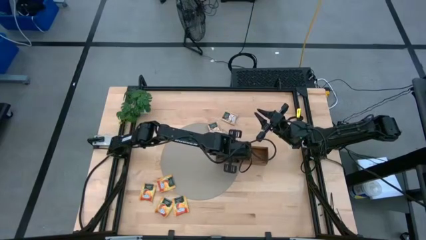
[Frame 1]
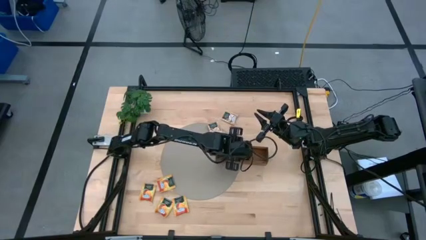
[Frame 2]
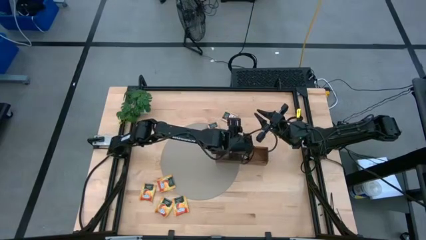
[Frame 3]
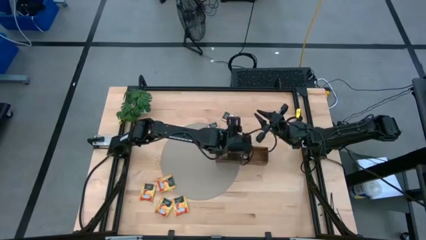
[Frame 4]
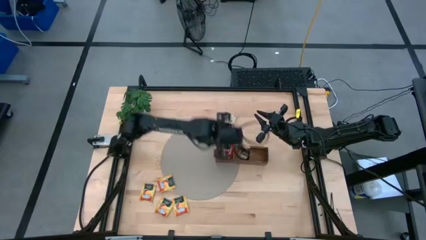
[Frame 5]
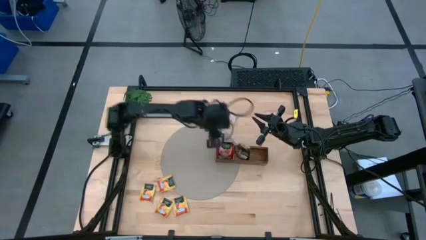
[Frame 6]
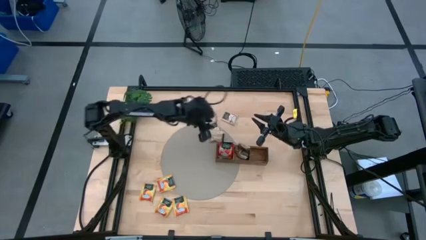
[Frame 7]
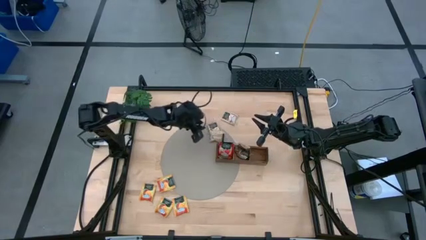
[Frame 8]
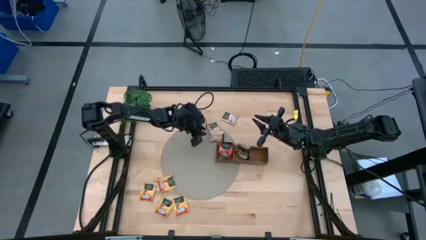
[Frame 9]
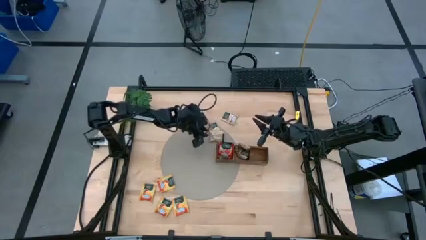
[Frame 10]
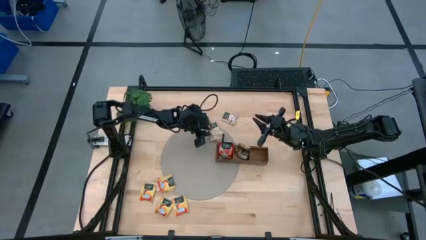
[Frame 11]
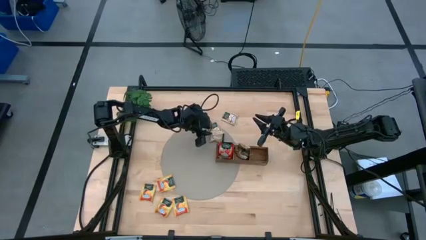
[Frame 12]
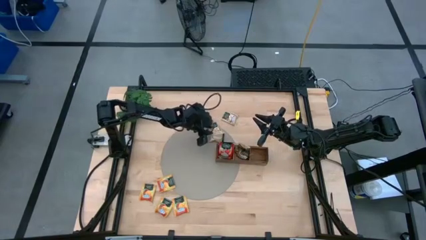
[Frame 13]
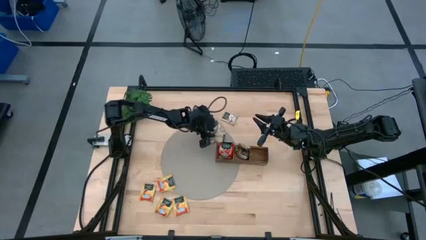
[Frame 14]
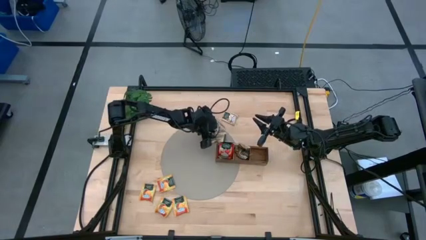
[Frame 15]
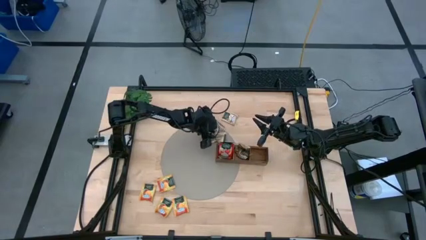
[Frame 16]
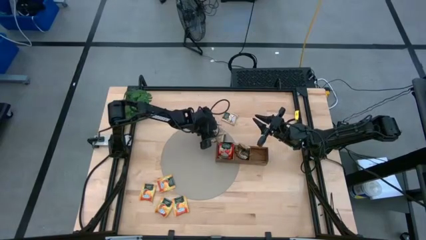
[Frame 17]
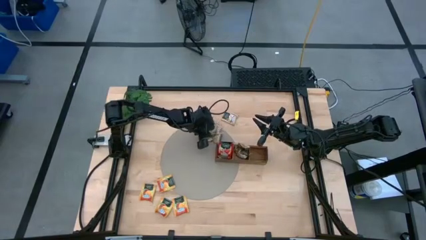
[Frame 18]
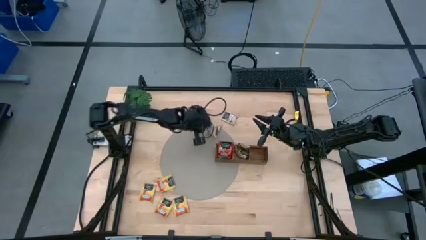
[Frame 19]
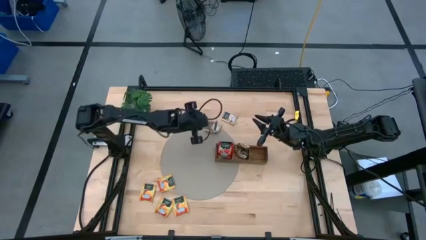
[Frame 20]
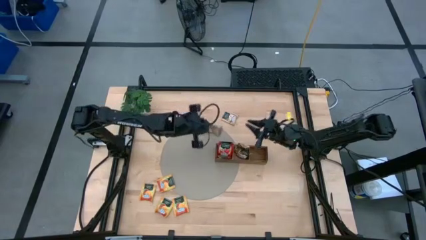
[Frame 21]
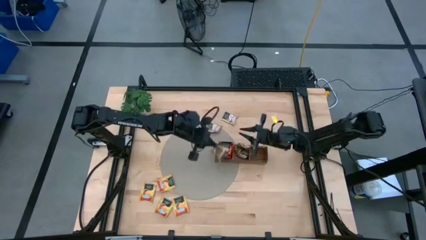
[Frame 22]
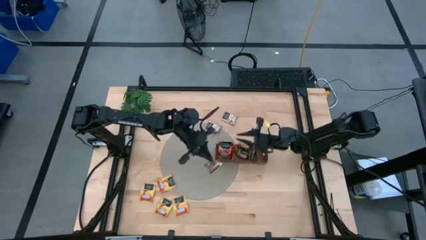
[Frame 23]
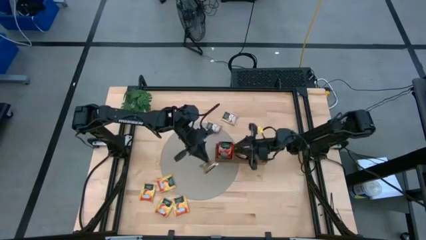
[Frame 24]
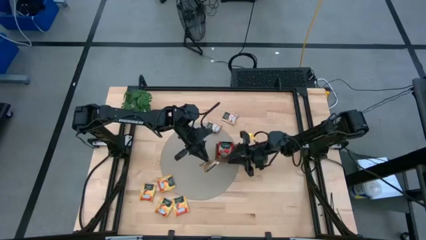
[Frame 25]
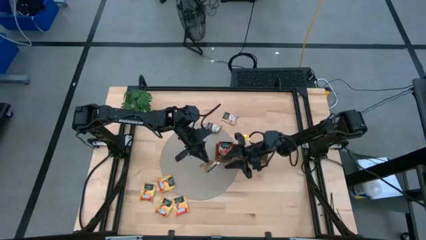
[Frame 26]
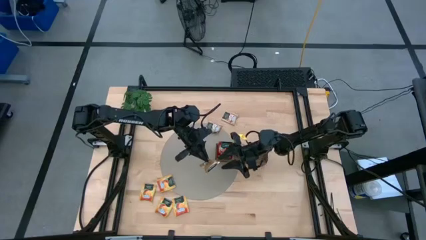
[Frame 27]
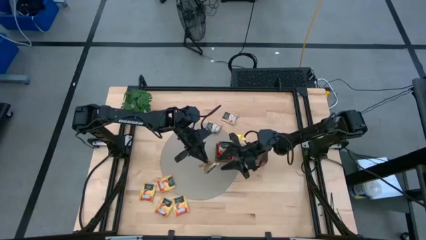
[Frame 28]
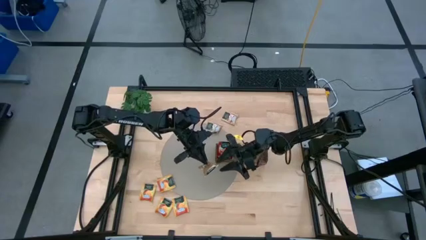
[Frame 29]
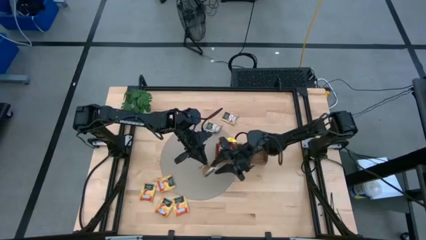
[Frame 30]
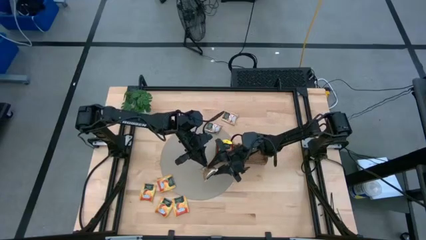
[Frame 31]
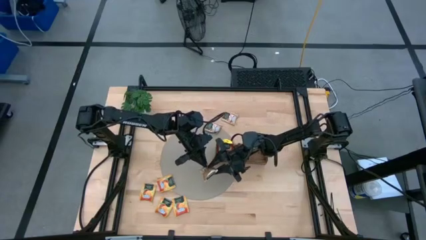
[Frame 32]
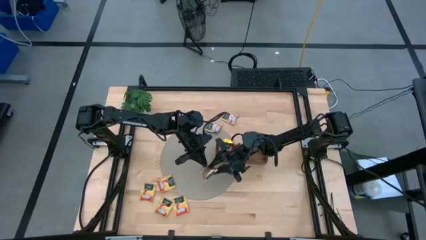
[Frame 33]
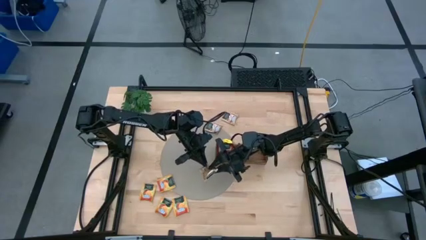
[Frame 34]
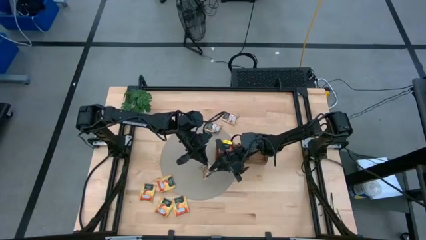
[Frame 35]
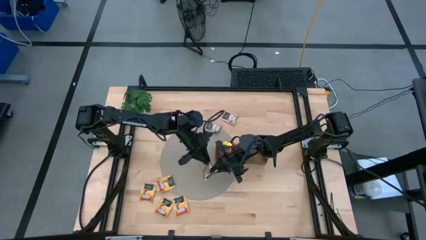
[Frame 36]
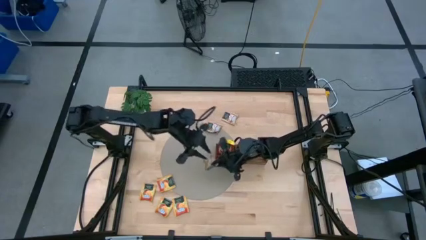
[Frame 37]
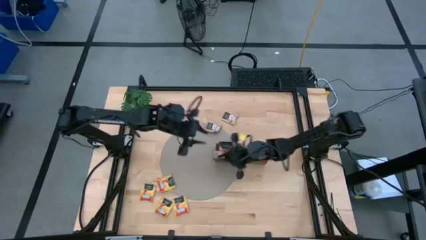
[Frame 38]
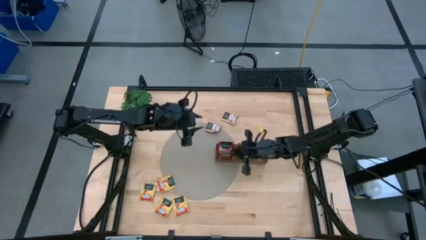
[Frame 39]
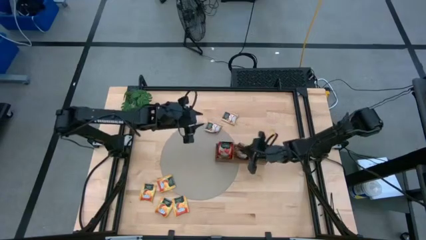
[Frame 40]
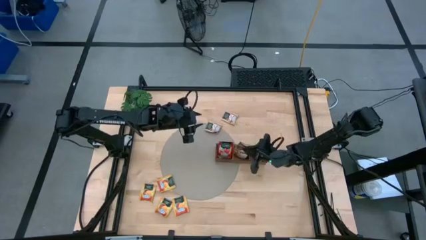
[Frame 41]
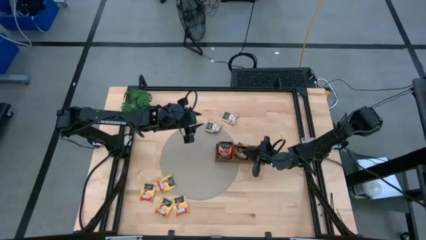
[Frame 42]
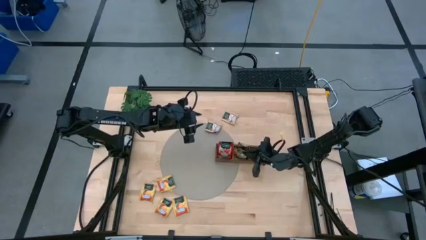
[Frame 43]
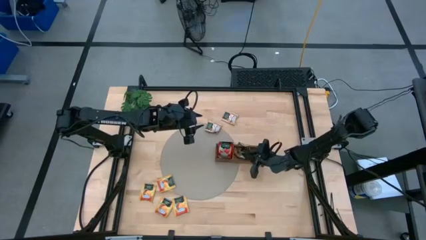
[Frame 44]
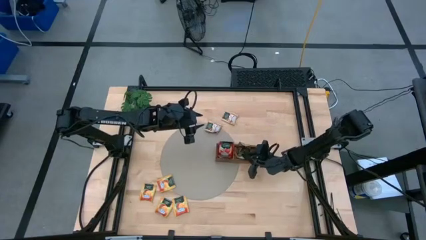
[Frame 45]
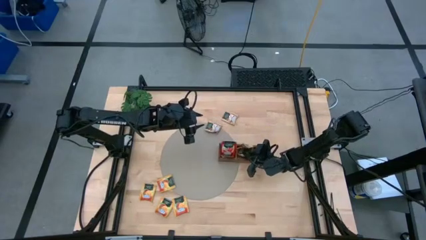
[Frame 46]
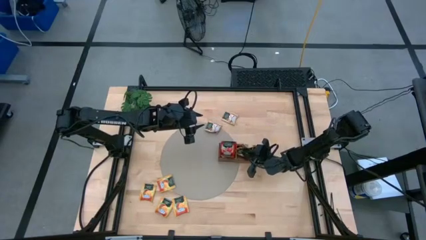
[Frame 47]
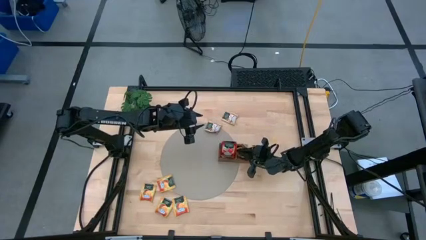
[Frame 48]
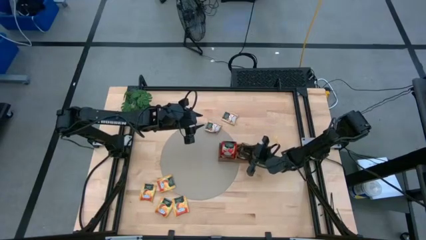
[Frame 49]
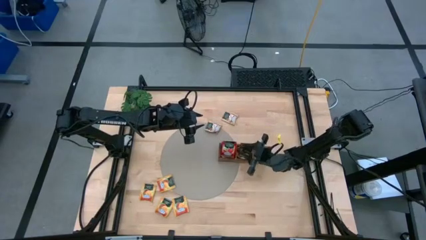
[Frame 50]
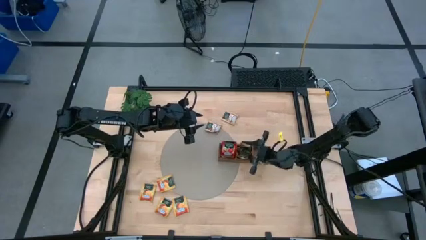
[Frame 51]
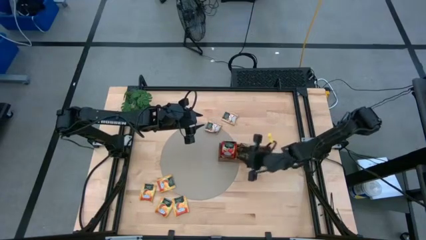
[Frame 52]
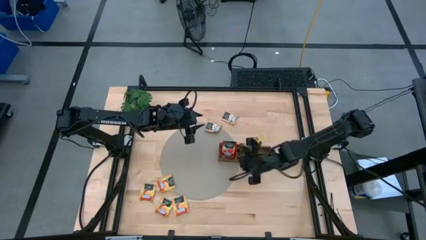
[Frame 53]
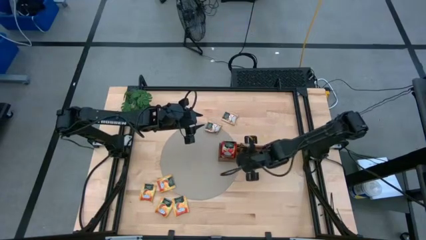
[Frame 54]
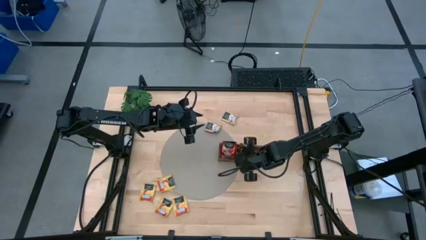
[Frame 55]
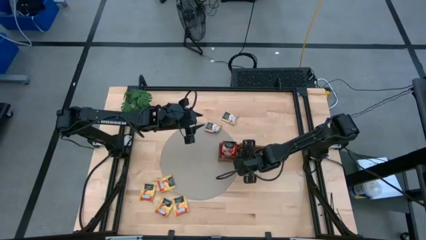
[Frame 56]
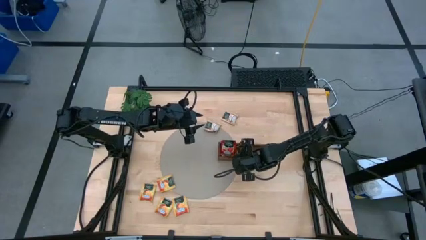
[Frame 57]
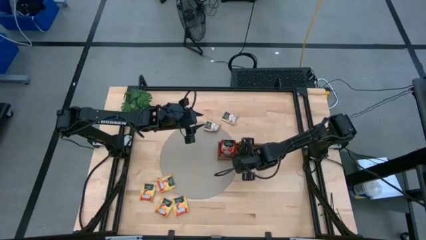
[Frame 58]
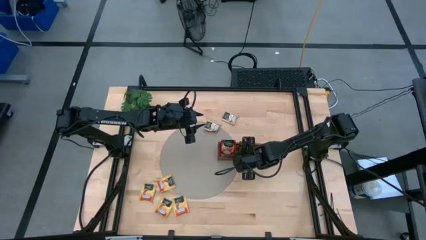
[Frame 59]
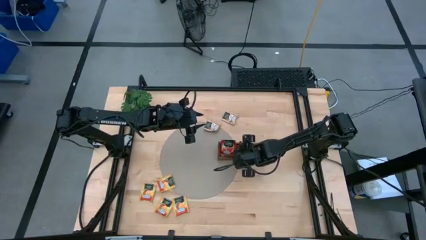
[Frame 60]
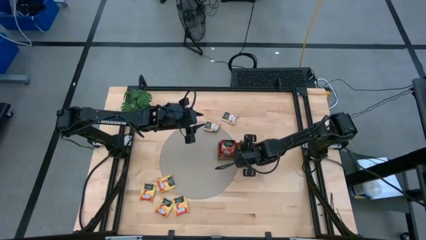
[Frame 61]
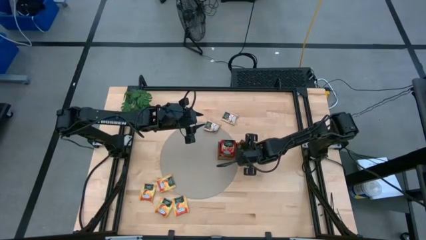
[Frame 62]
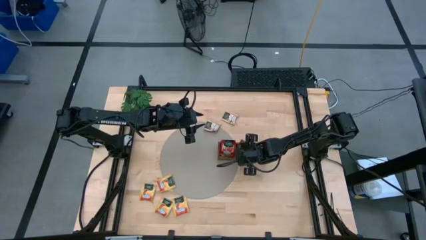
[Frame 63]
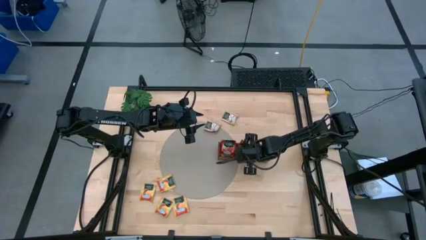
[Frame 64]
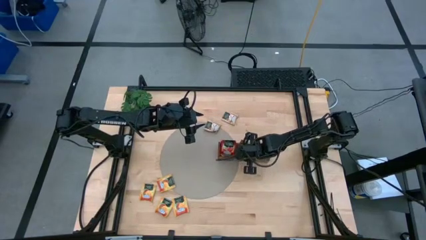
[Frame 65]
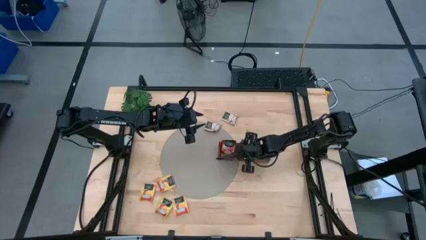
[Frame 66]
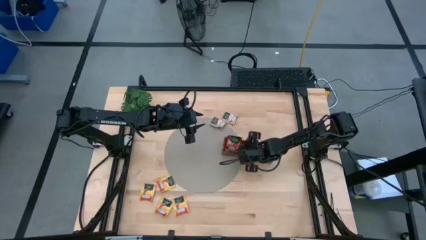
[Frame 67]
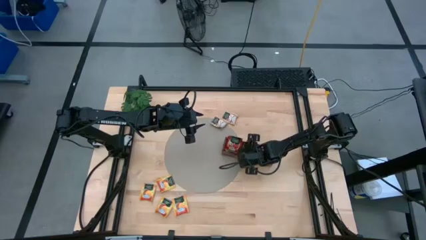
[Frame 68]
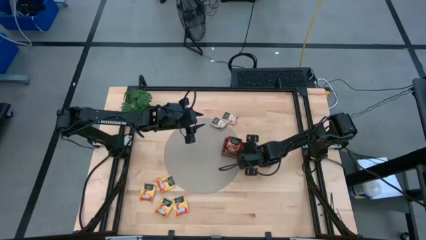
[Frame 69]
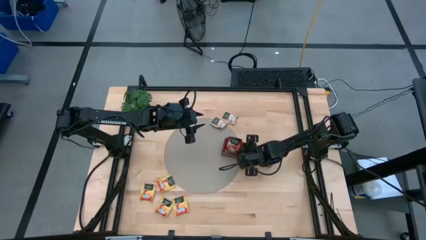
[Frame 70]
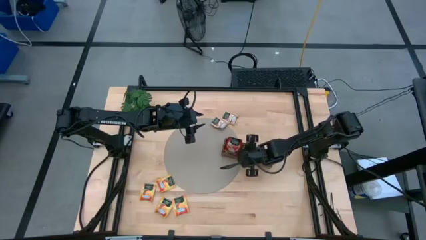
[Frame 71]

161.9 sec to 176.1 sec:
Task: Pick & Place Tea
Put the brown tea bag into the middle section of the wooden organizer

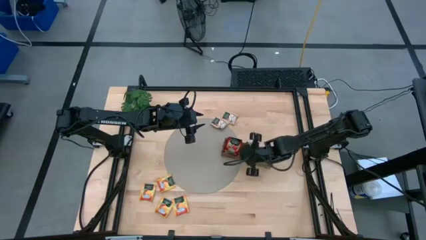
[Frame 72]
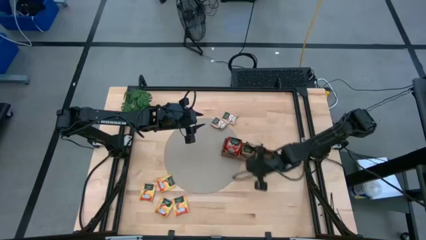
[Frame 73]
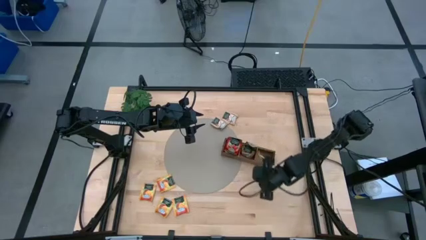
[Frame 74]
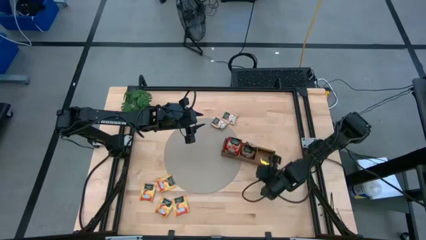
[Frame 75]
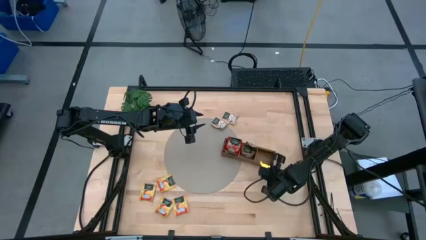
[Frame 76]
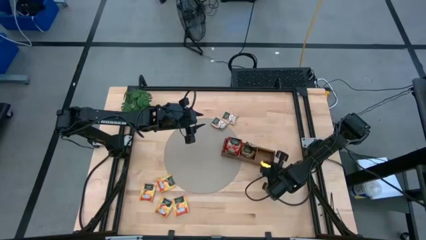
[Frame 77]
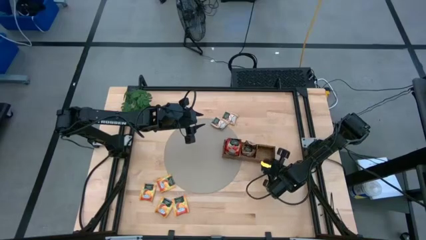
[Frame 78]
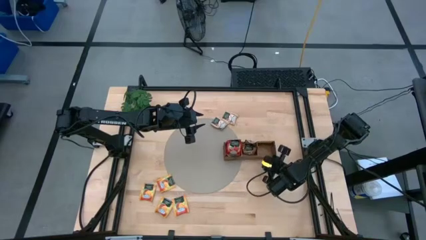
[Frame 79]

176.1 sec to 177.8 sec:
Adjust the wooden organizer on the table

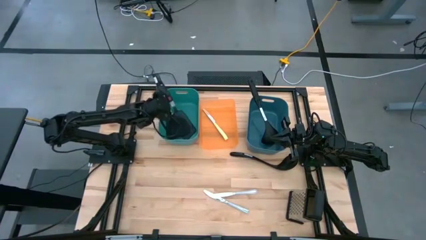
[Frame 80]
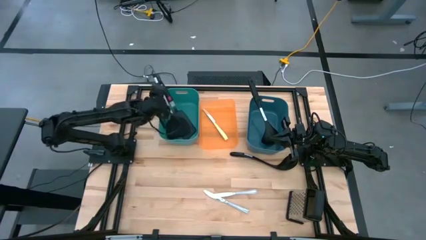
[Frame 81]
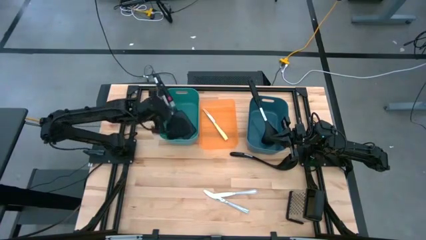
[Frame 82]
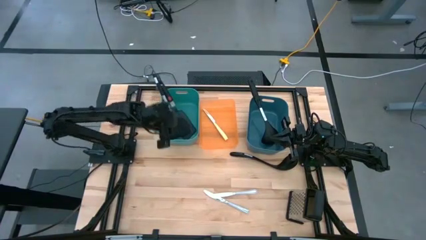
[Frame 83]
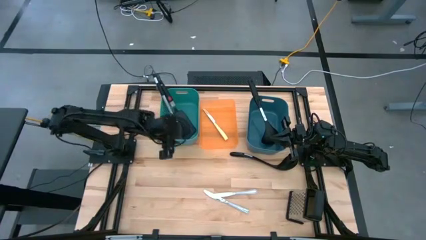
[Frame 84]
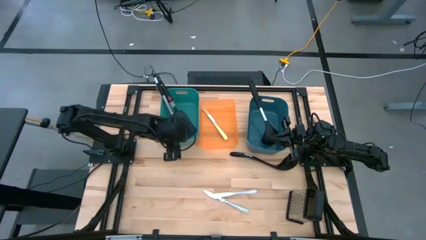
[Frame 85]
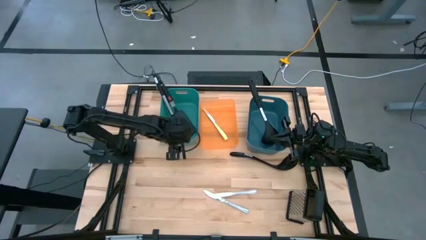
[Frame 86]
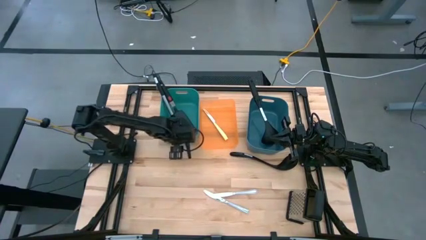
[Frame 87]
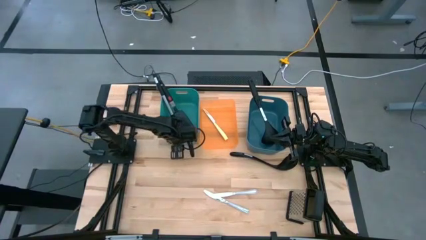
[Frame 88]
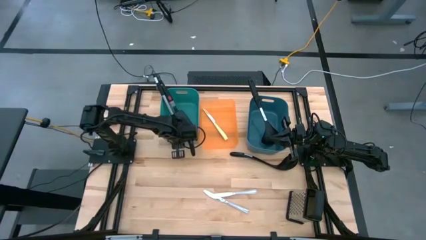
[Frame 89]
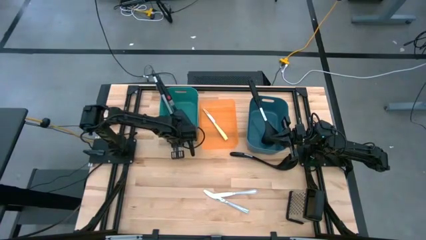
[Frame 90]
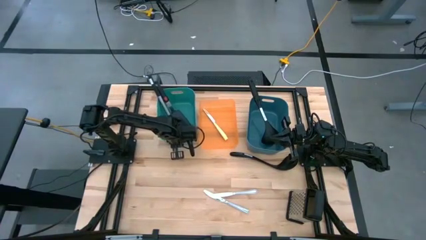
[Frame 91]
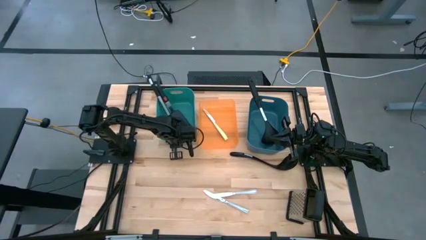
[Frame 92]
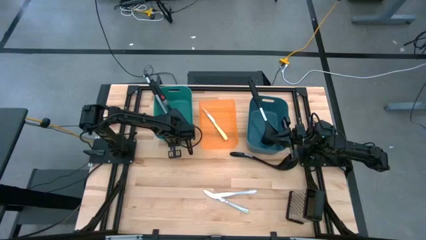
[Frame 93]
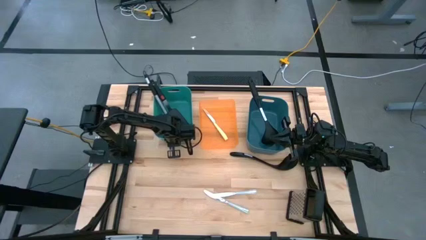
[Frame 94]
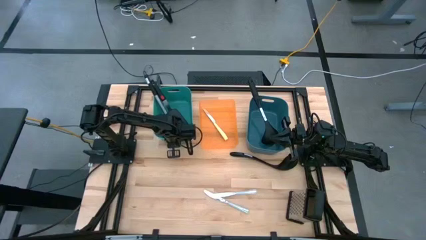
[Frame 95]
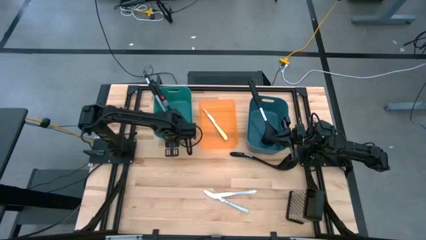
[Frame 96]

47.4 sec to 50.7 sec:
Task: Pick & Place Kitchen Items
Adjust the light green bin
